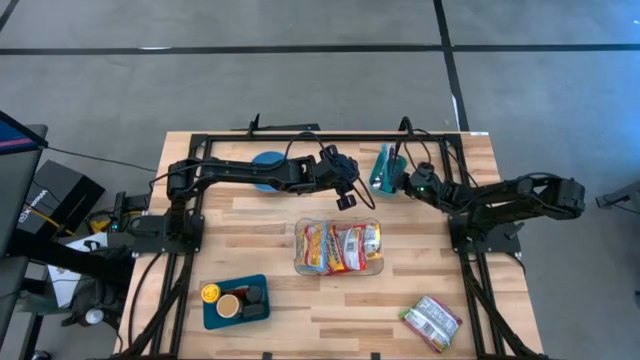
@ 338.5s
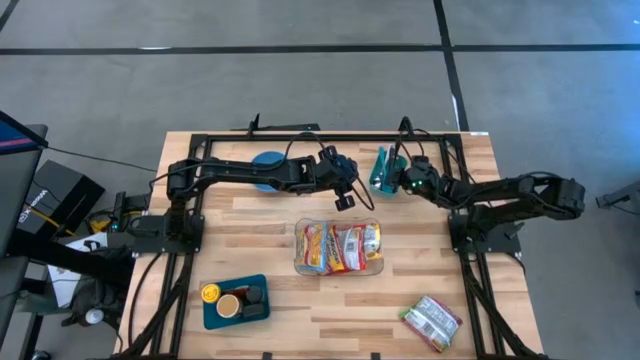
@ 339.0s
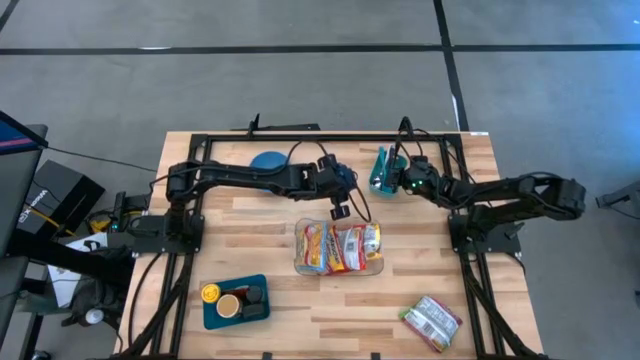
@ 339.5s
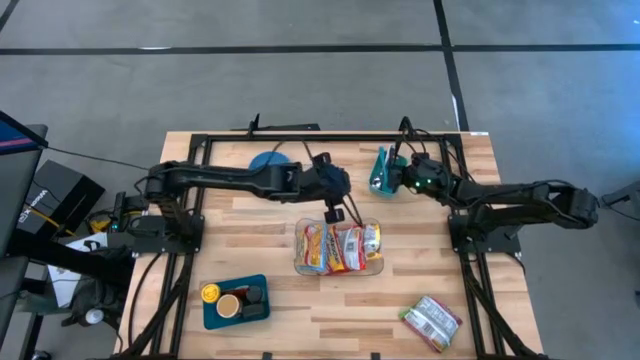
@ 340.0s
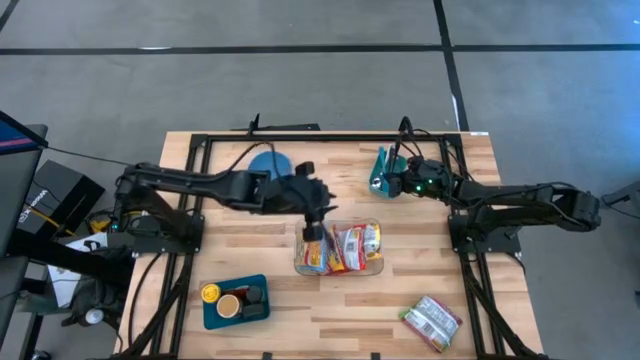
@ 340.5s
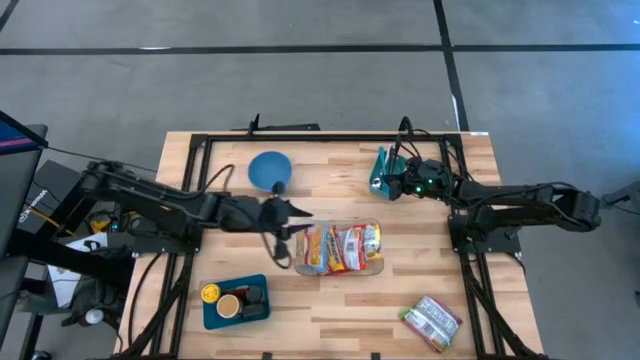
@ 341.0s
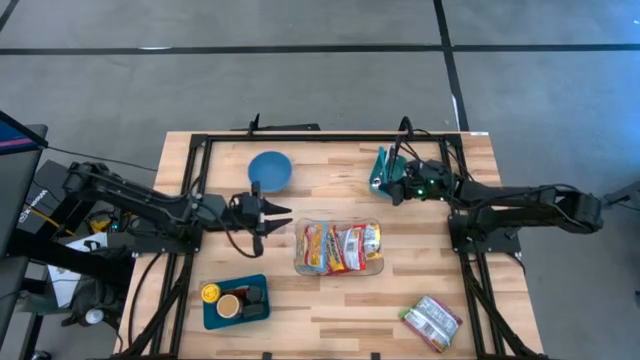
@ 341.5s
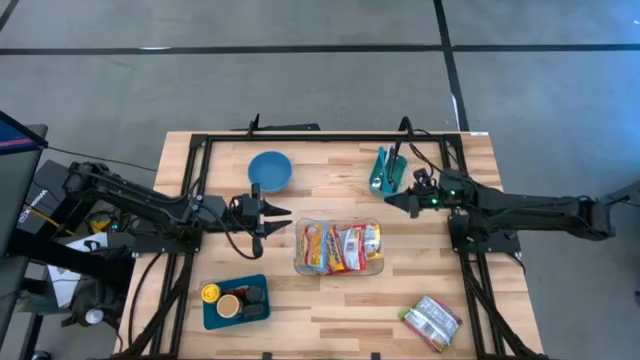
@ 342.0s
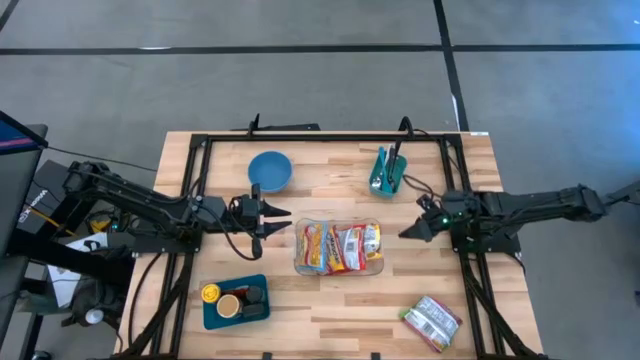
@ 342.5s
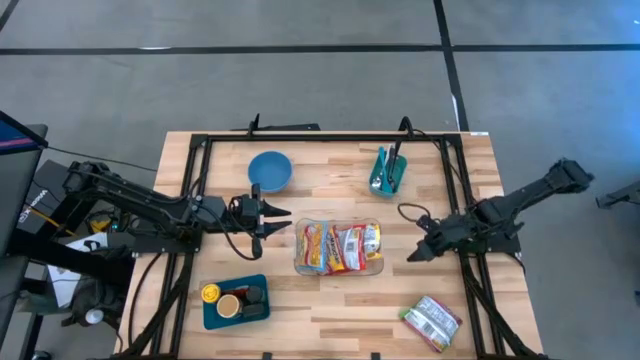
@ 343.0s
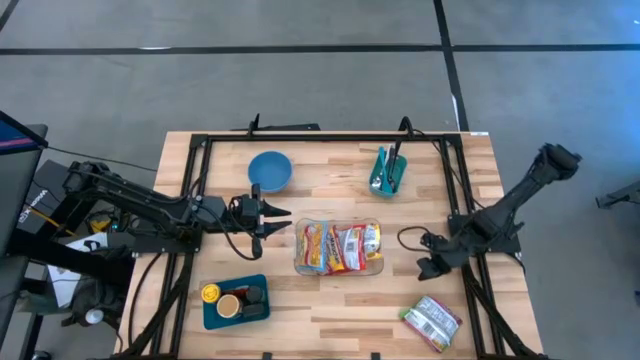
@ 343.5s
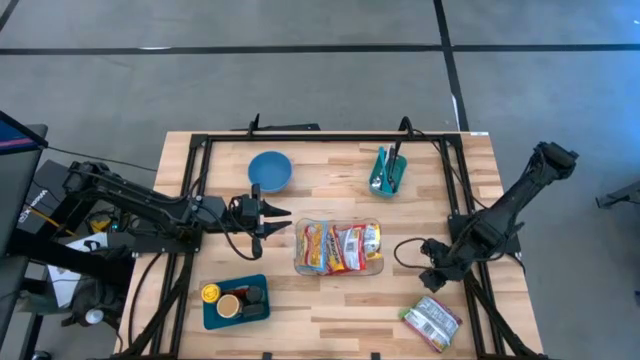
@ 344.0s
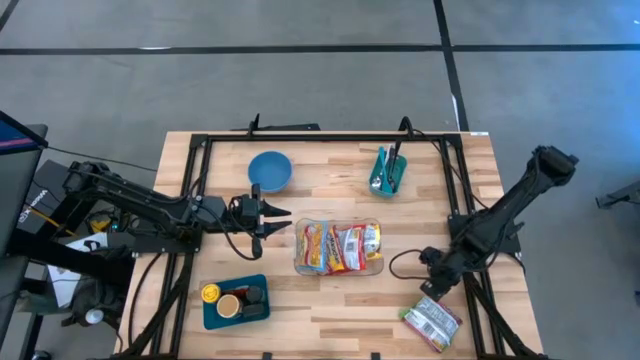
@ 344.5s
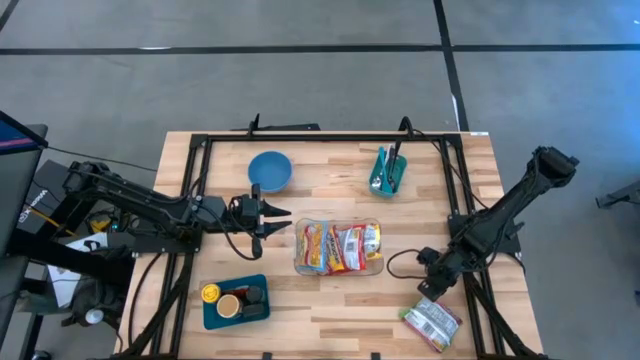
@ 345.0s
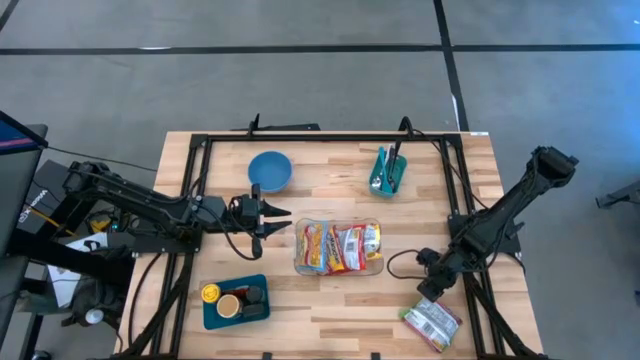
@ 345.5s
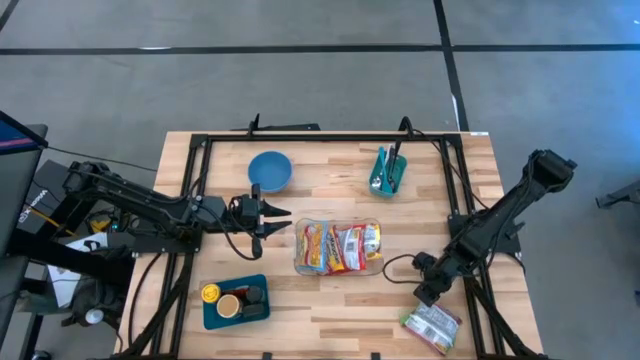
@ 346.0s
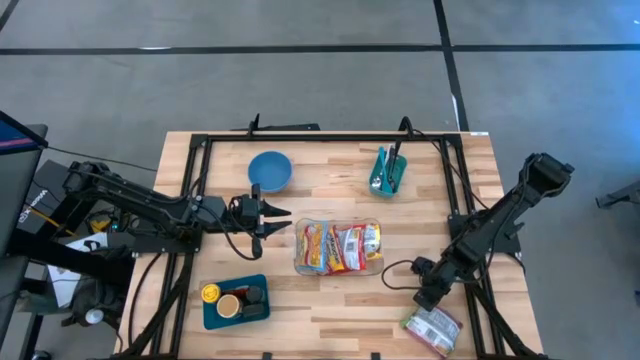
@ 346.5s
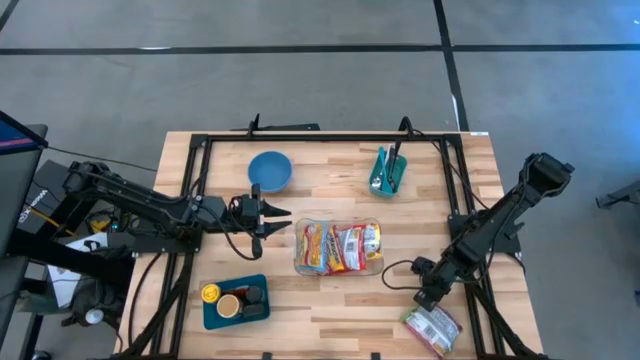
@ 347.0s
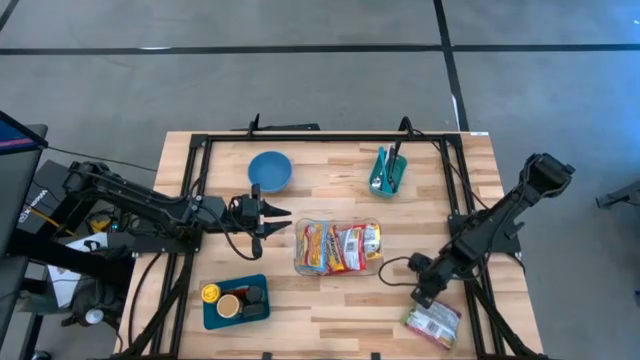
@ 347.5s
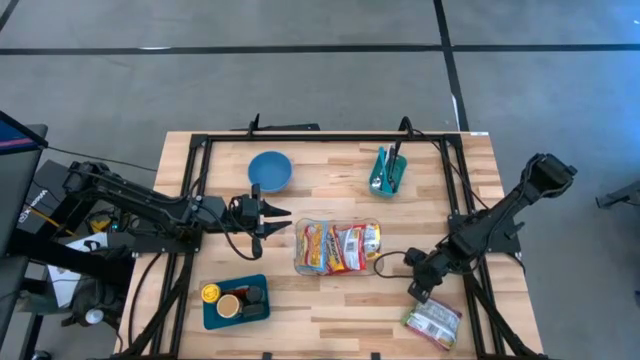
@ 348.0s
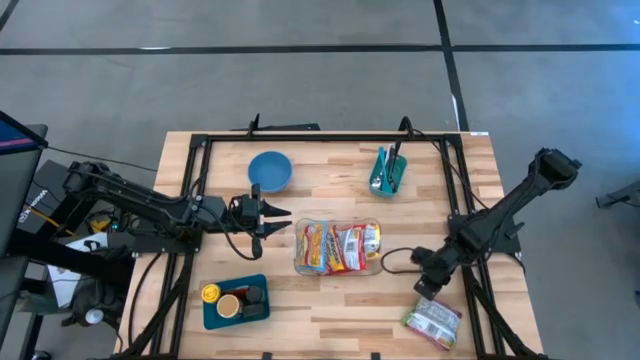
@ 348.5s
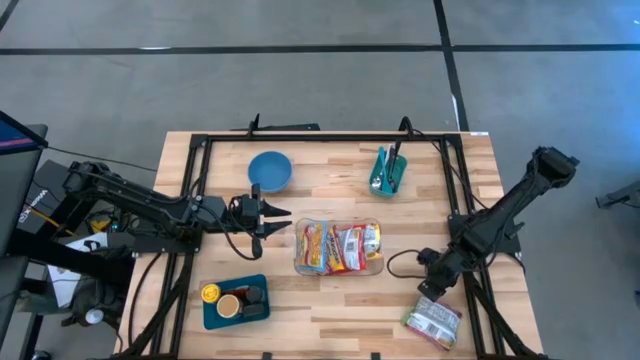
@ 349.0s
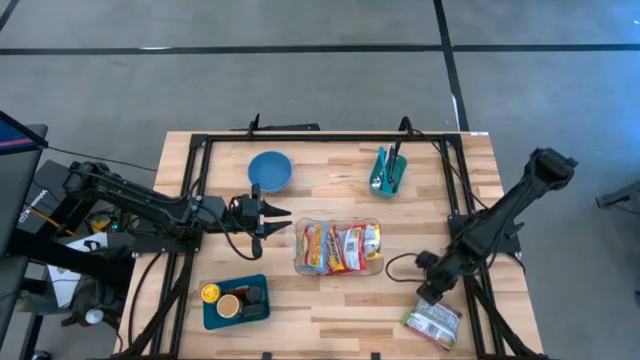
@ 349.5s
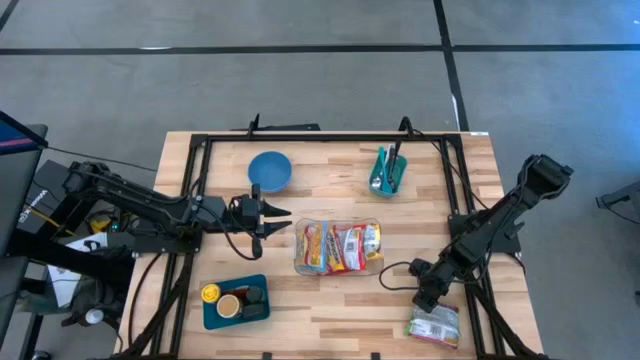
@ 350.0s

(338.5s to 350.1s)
Task: Pick & Place Food Item
Put the pink noodle pack into the transparent bin

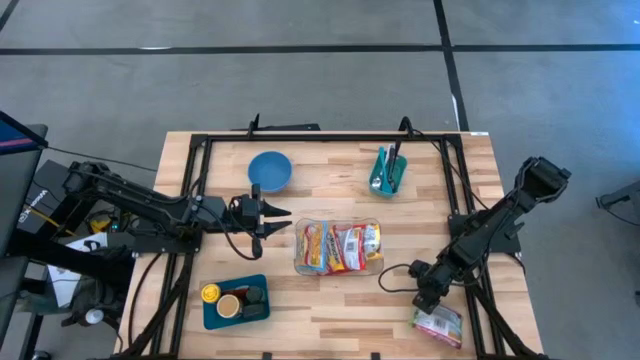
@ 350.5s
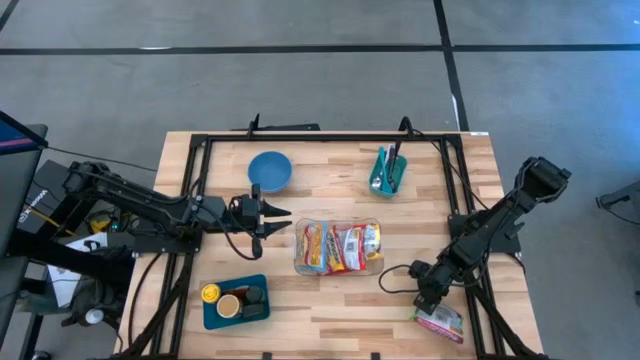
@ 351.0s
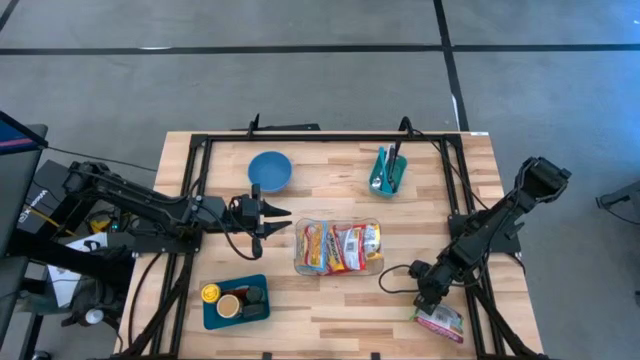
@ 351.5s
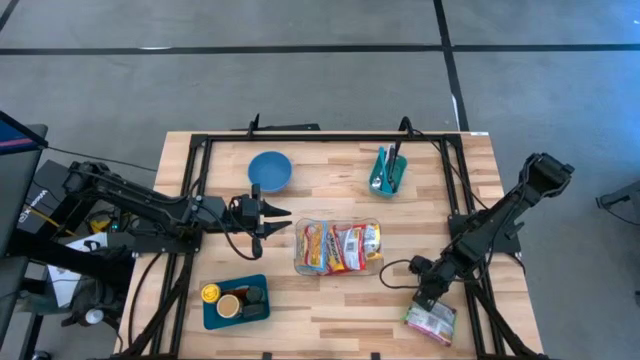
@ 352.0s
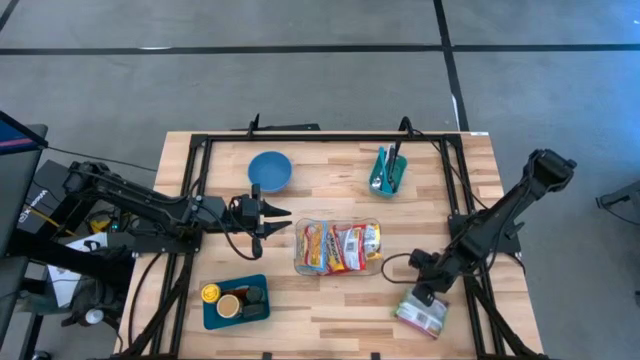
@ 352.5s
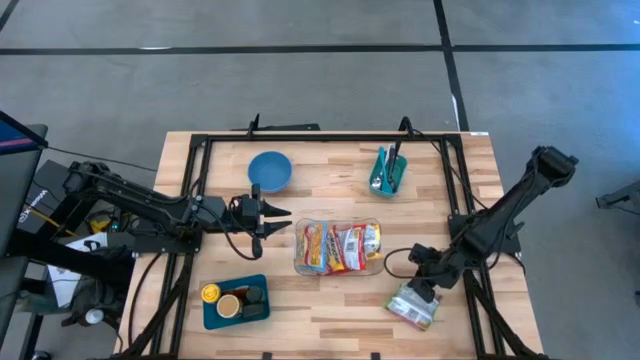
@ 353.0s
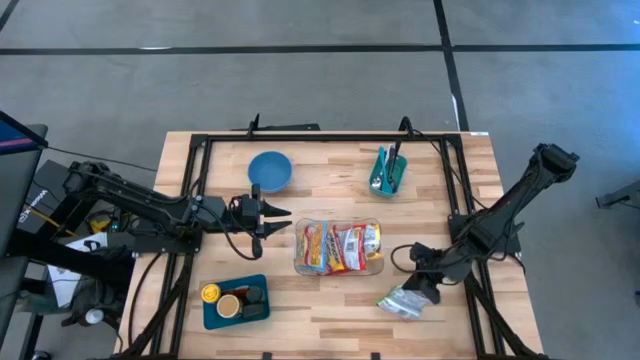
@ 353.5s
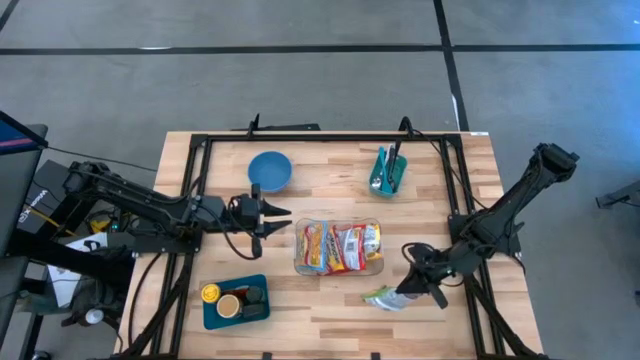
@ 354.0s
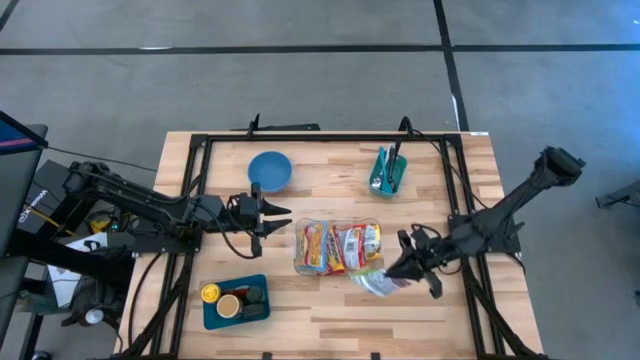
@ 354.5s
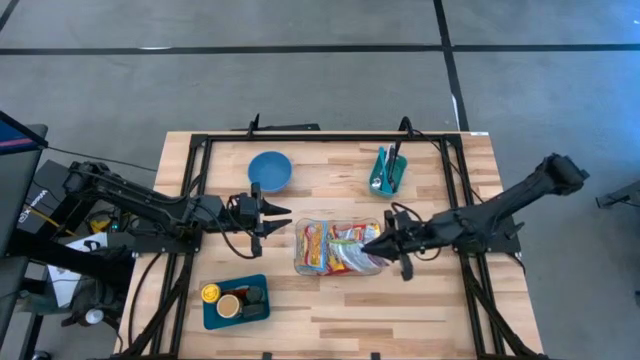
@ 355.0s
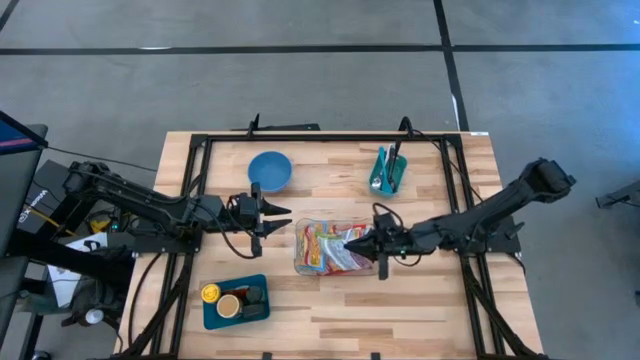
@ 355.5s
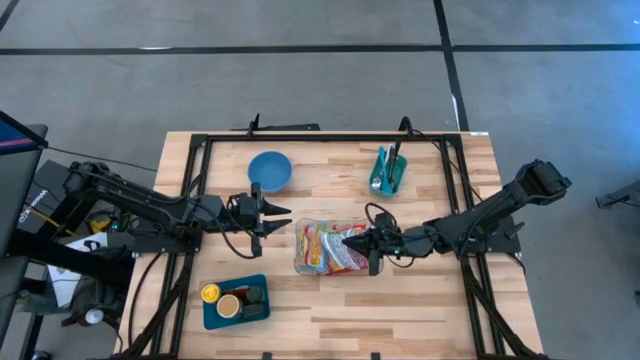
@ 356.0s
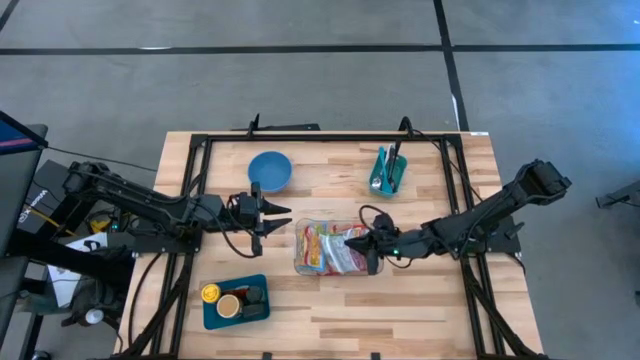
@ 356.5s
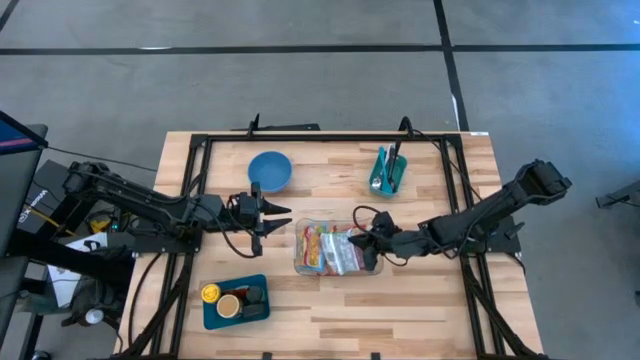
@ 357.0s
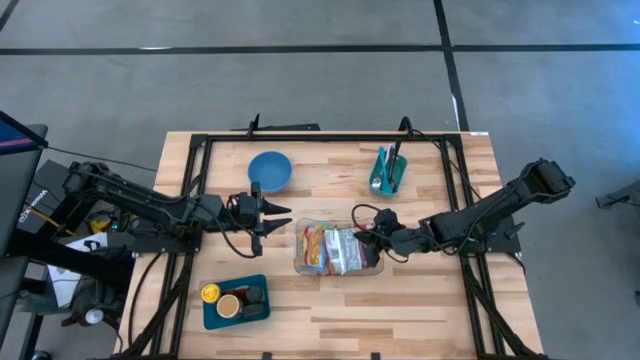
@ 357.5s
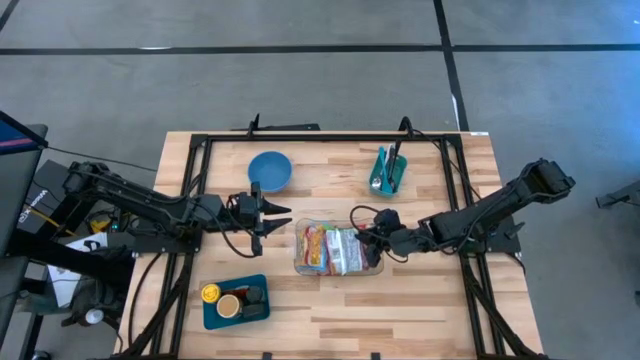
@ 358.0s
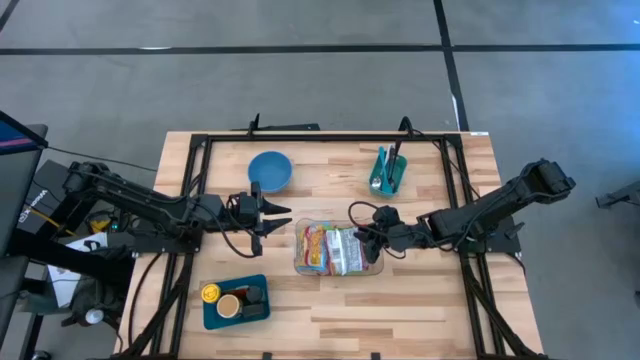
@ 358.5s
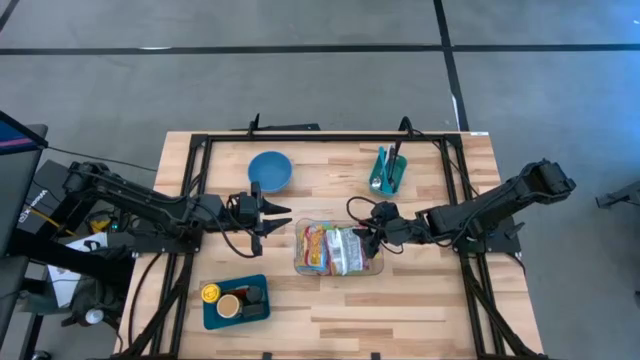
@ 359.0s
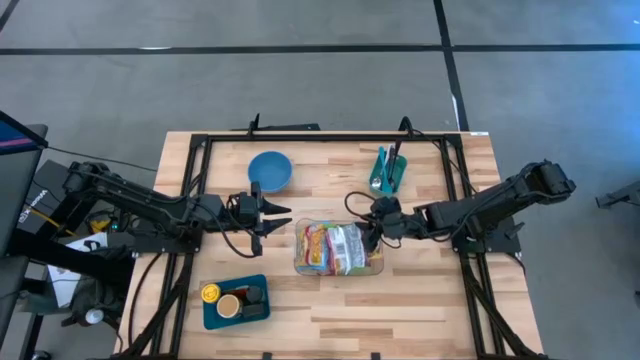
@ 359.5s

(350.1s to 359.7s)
Put the pink noodle pack into the transparent bin

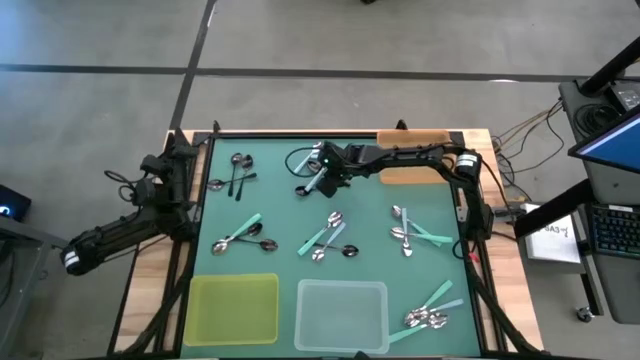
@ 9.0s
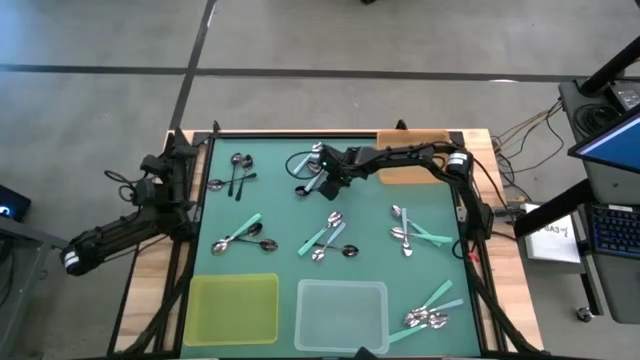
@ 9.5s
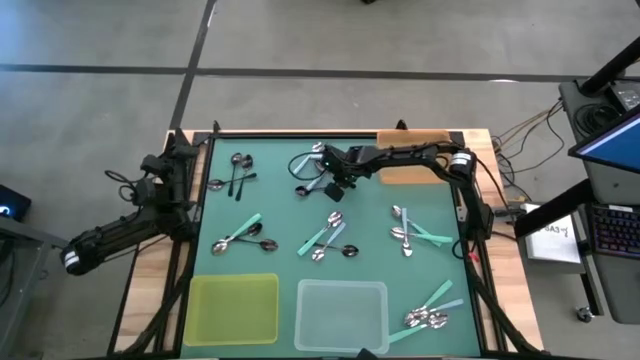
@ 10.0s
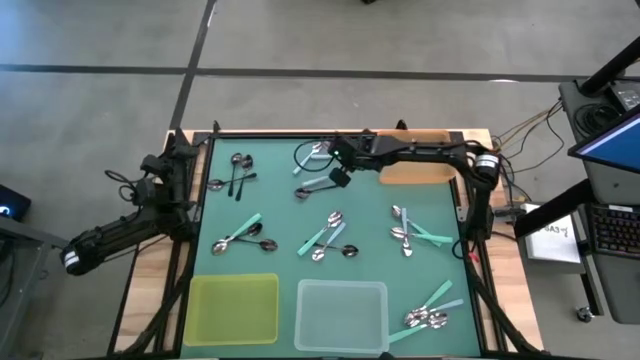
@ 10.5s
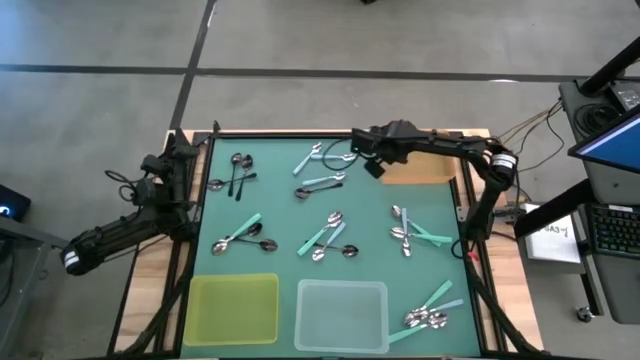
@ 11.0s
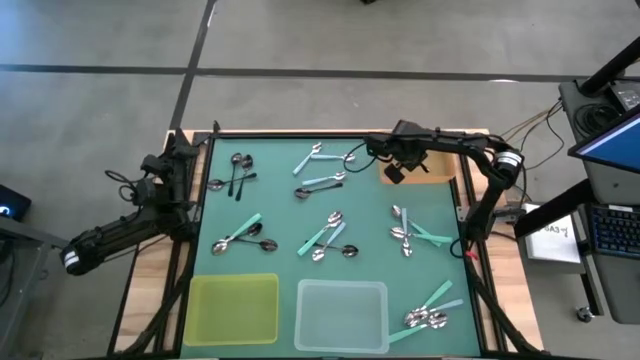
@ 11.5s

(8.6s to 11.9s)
Task: Sort silverware by color (type)
Put the black spoon into the orange bin
